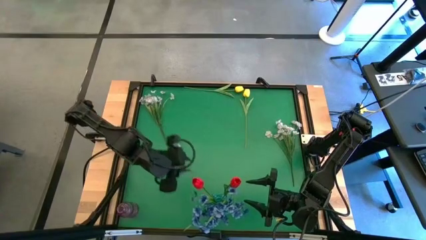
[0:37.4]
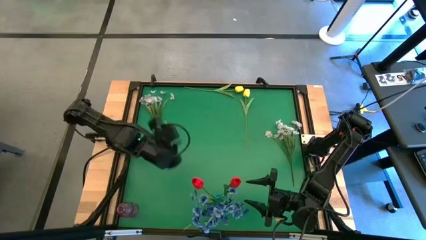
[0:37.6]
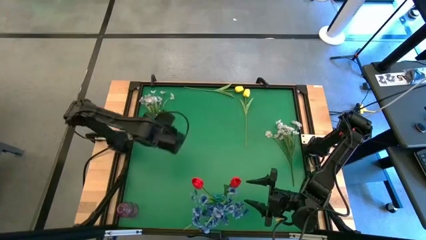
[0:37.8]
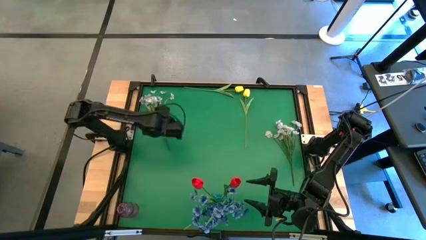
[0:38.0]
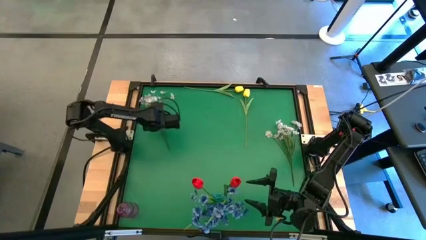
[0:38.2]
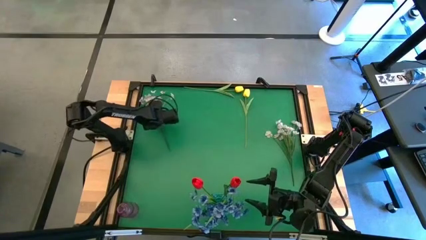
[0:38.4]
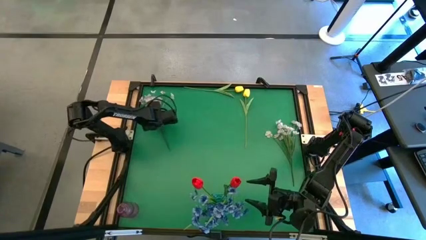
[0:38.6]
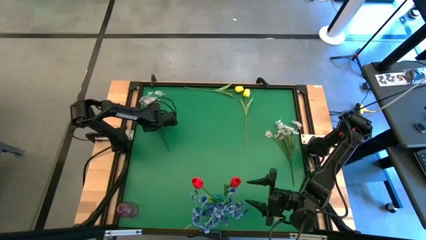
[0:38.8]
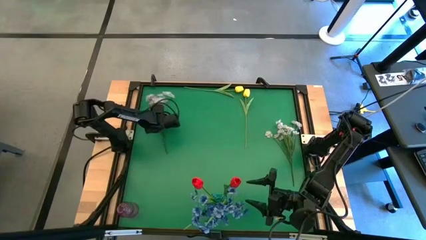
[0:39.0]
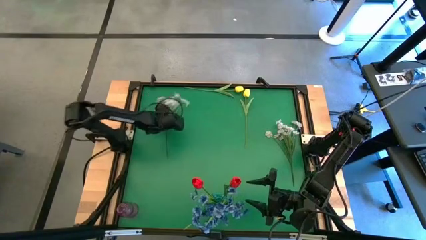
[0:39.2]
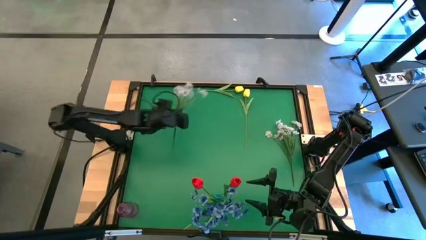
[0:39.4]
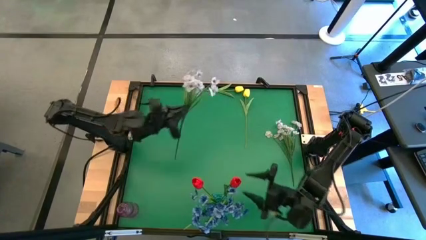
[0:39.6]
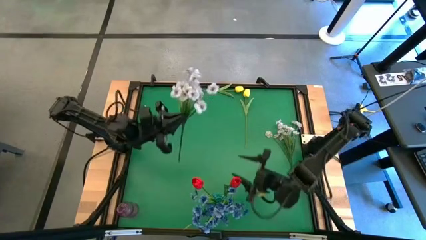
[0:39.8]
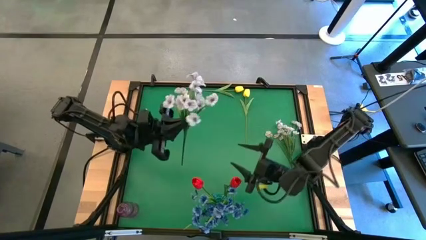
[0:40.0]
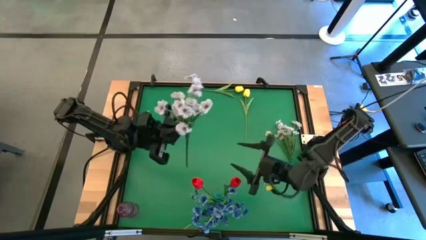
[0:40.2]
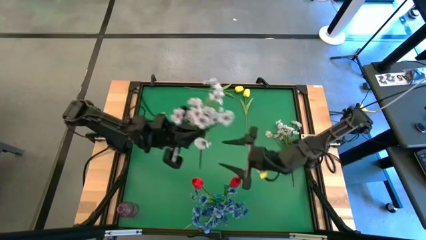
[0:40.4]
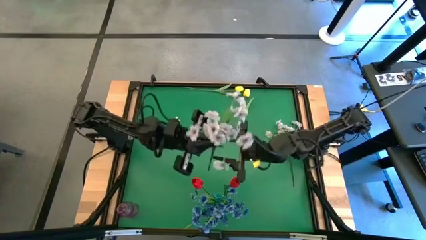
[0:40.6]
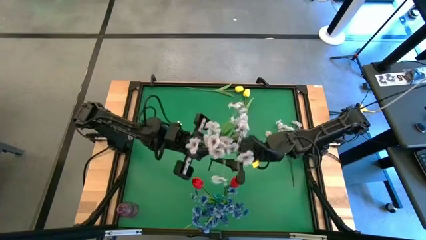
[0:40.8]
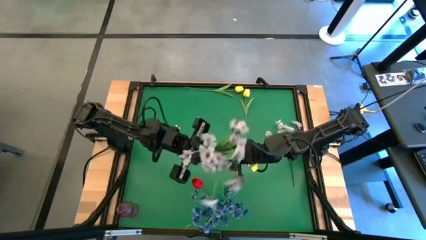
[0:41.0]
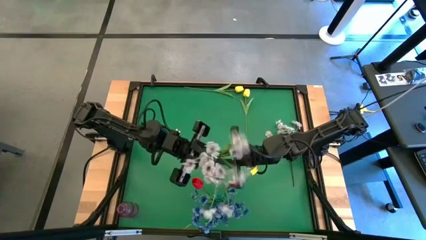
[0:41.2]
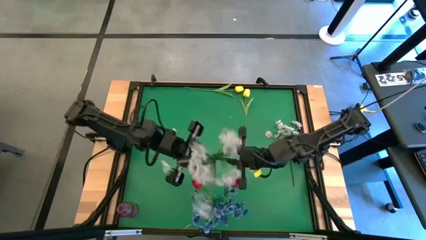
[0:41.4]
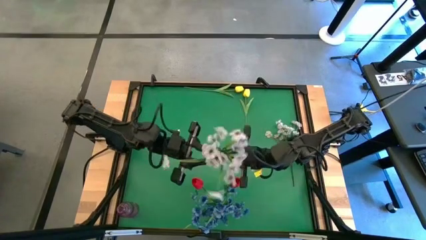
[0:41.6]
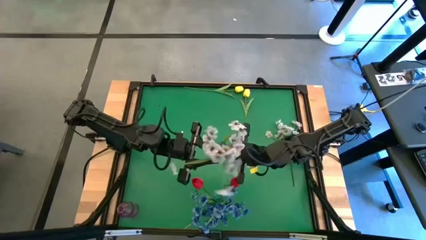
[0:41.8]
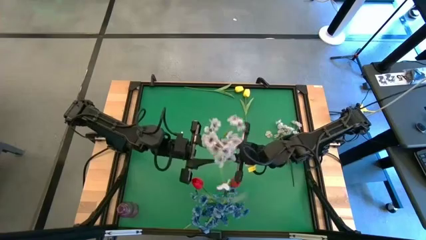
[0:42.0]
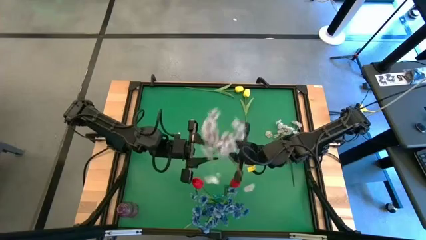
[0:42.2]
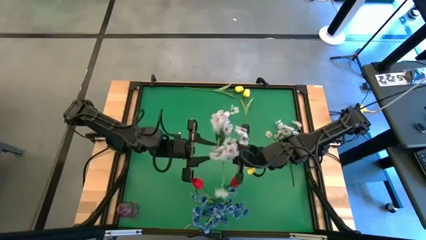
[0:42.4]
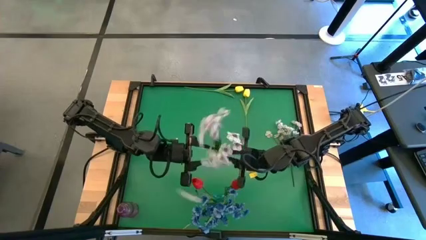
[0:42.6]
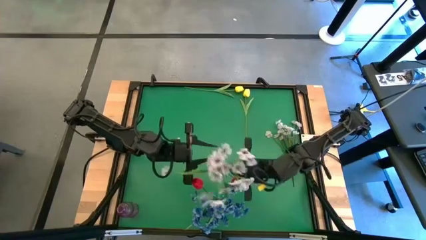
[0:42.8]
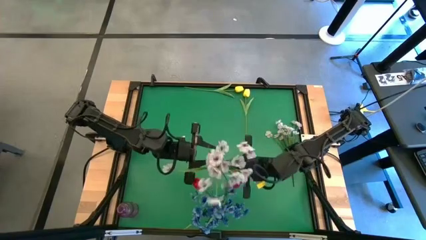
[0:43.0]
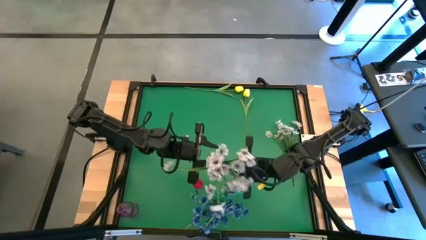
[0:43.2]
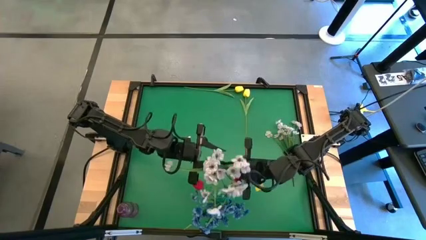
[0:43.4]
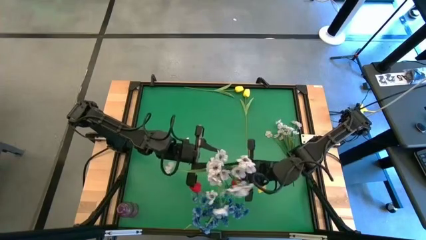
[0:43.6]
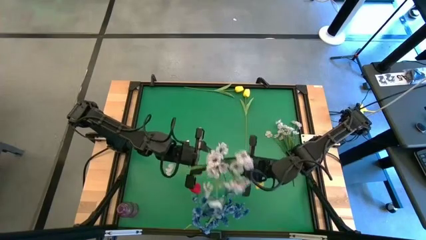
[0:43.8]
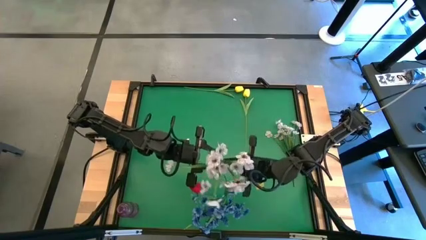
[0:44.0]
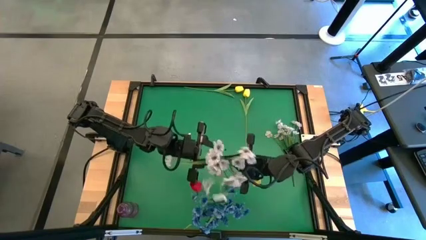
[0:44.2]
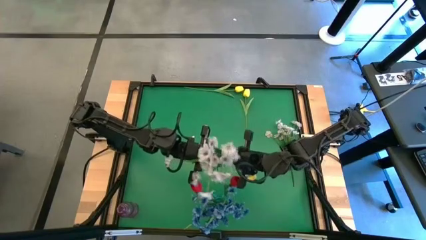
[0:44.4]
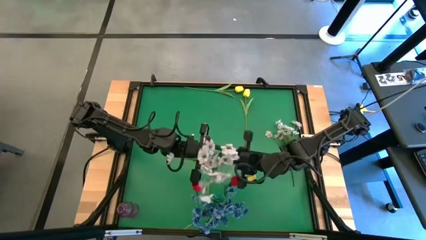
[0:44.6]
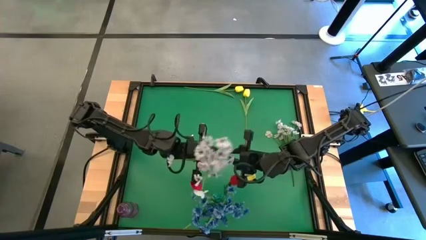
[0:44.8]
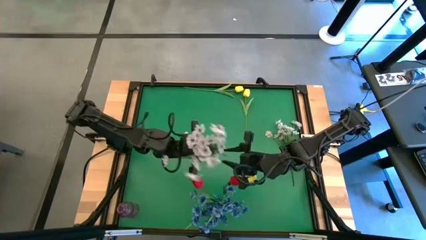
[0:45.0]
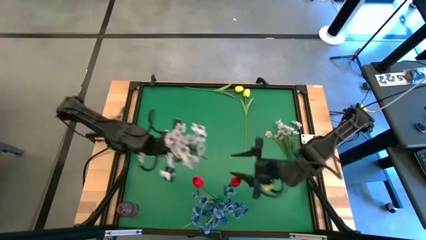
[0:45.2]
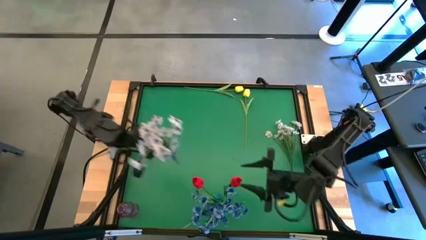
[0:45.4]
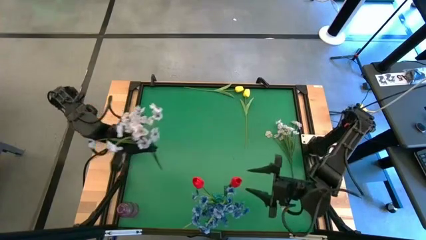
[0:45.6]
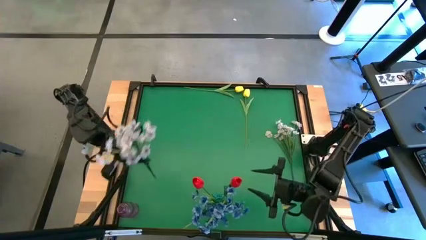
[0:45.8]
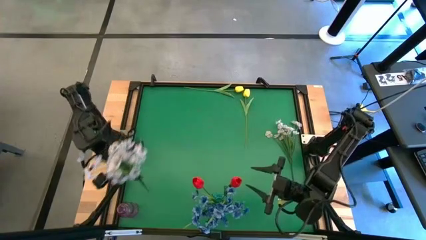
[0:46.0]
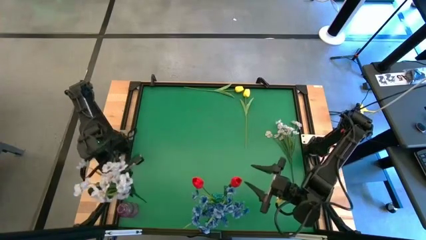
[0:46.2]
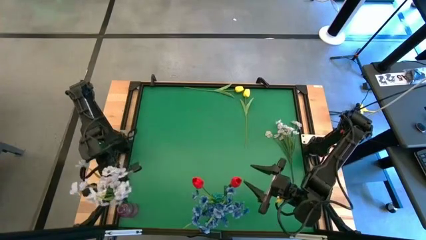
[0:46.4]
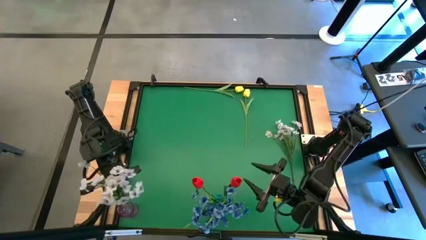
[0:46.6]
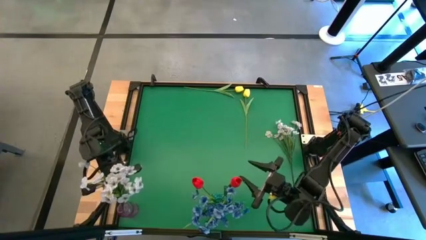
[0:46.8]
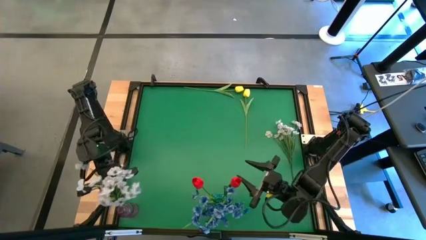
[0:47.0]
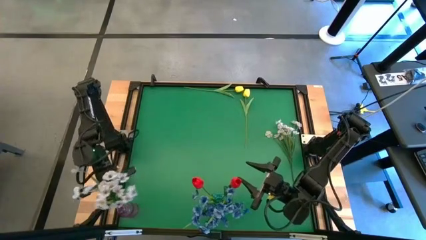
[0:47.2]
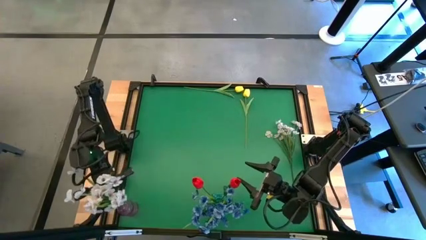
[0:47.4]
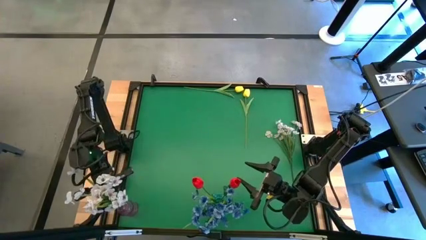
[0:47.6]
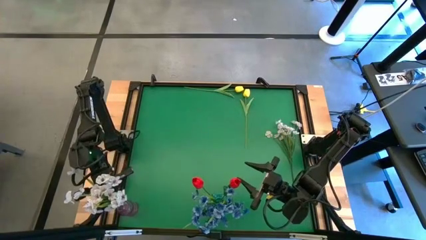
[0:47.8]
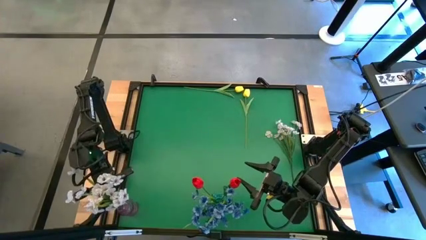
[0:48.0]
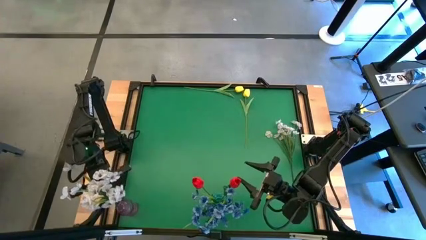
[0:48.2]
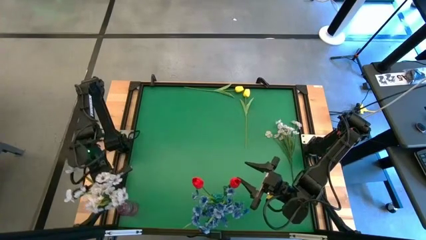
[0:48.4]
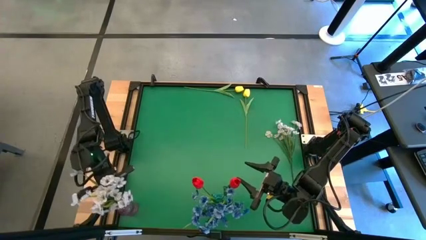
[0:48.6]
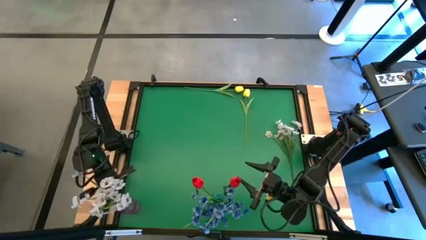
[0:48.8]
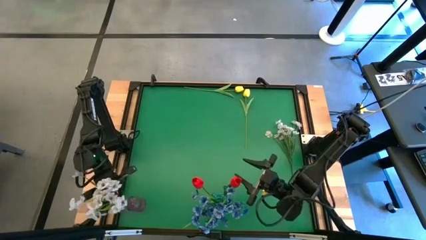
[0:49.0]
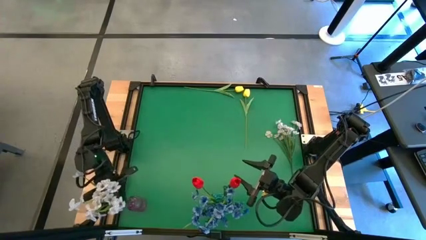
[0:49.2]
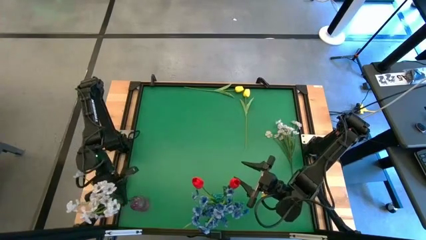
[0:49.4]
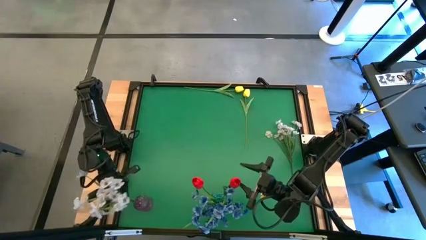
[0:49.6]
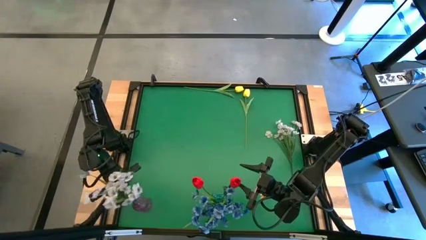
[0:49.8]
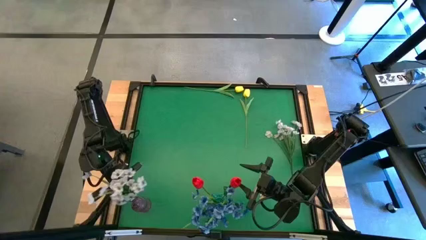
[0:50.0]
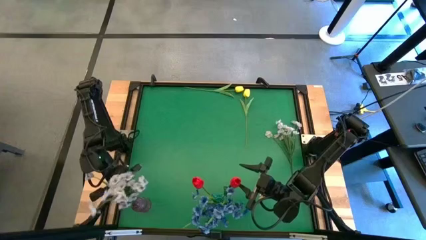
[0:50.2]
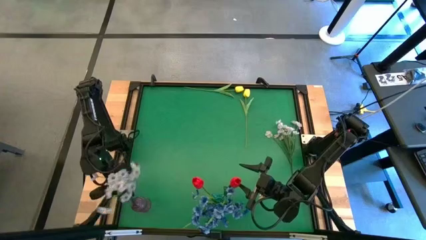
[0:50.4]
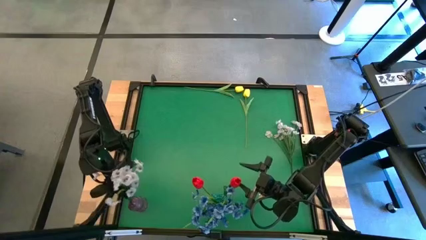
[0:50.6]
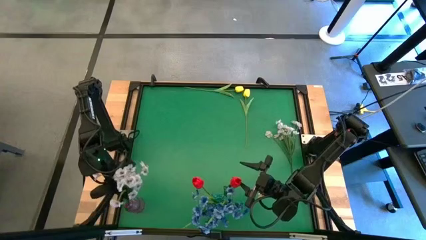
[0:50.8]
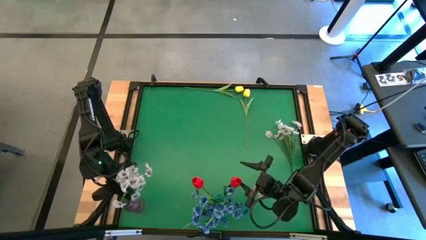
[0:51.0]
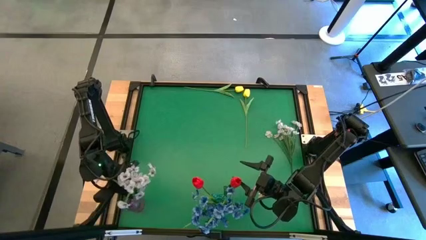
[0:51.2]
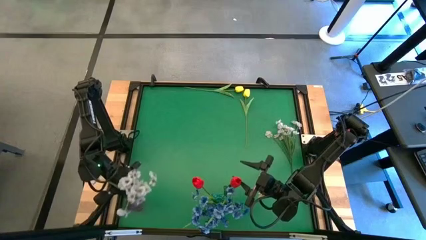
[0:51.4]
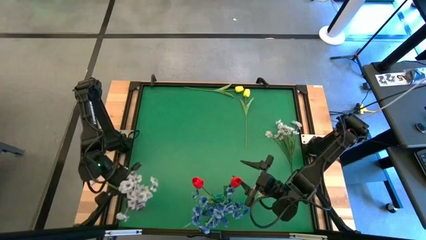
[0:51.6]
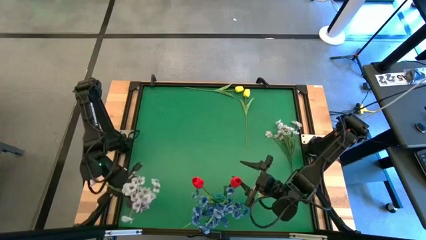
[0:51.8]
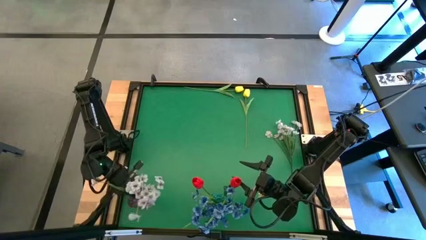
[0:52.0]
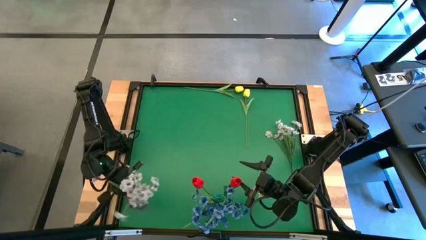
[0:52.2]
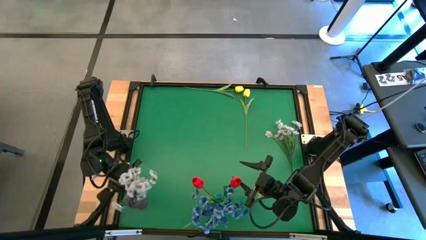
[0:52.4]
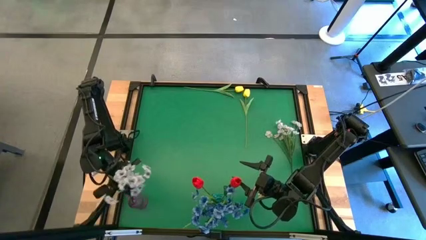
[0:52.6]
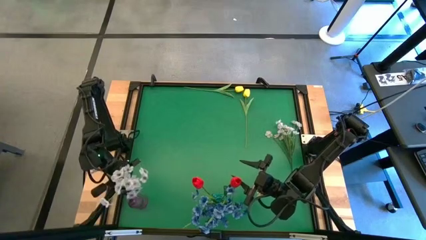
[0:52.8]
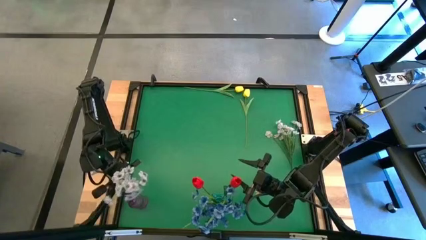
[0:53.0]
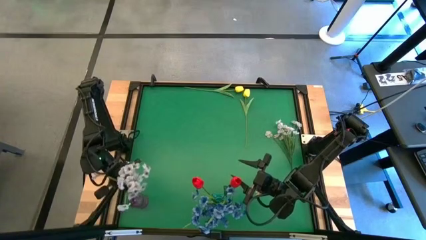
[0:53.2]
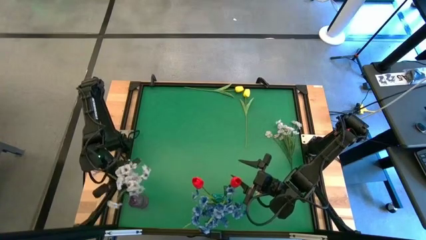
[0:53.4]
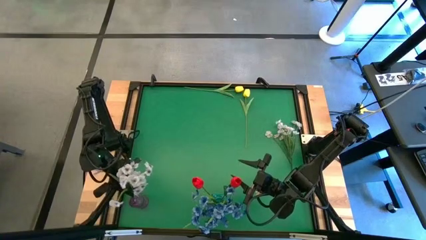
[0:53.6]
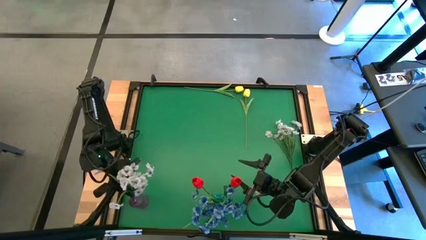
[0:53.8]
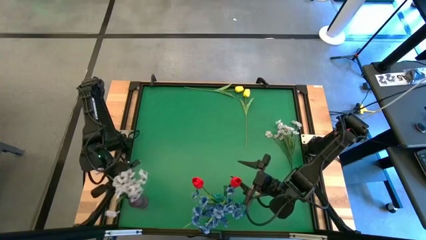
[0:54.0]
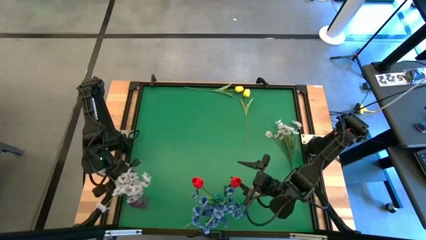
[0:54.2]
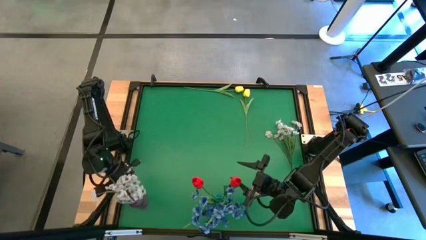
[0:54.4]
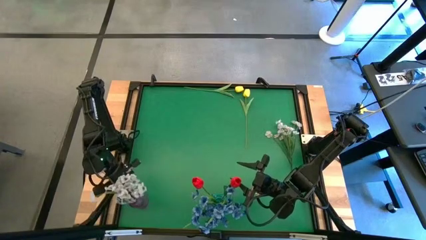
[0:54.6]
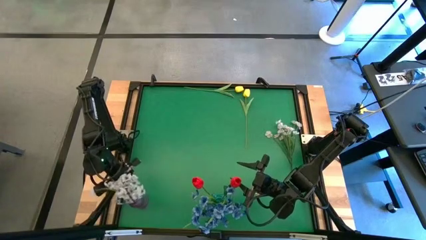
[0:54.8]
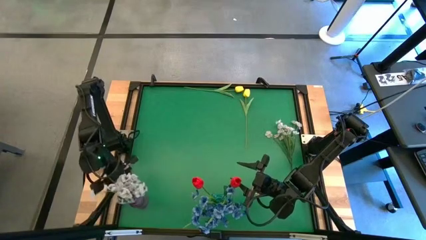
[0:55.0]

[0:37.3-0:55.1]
Task: Sort flowers into vase by color
Put the left white flower into the purple vase
